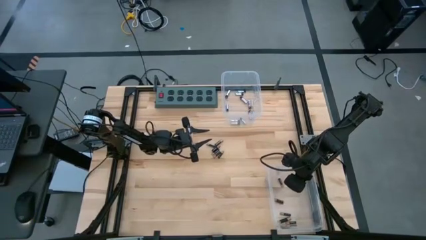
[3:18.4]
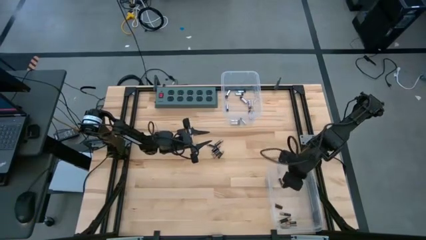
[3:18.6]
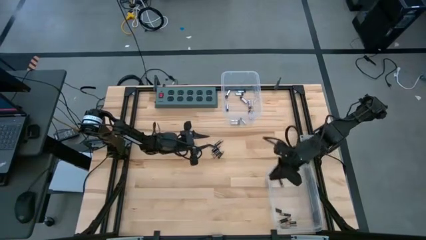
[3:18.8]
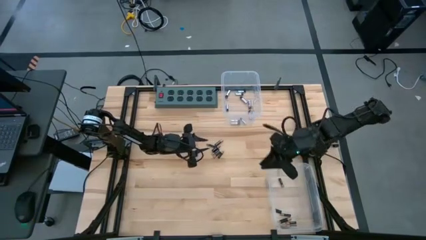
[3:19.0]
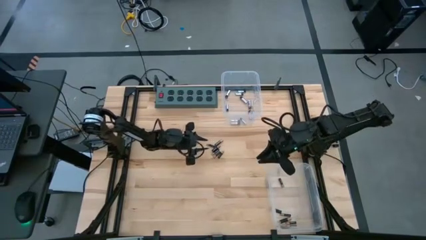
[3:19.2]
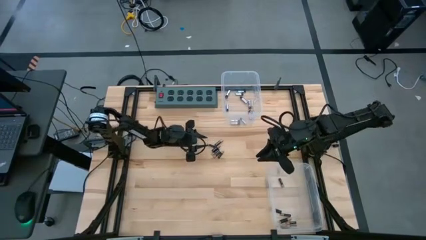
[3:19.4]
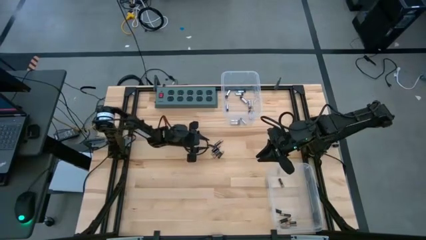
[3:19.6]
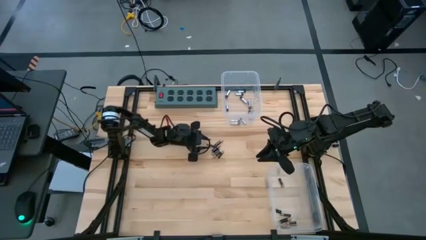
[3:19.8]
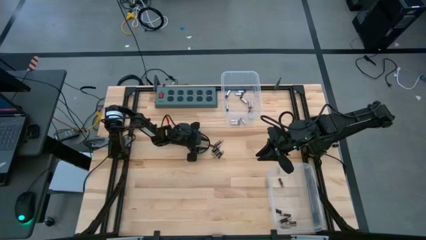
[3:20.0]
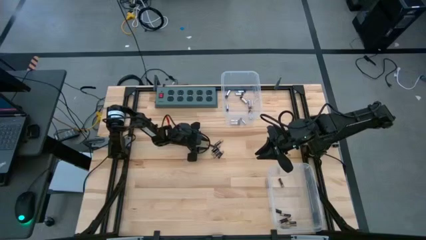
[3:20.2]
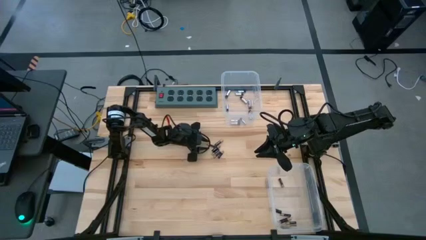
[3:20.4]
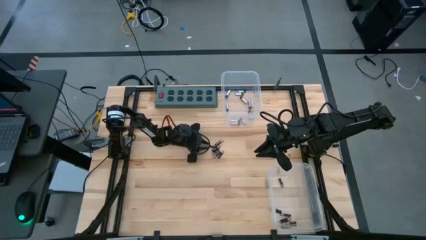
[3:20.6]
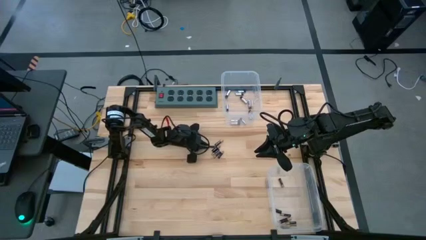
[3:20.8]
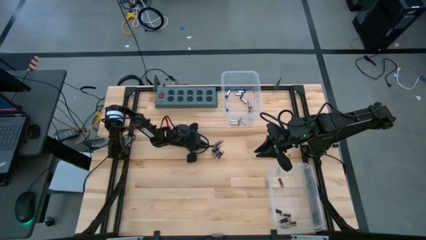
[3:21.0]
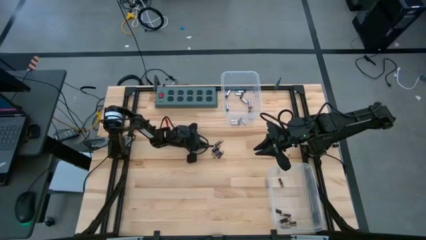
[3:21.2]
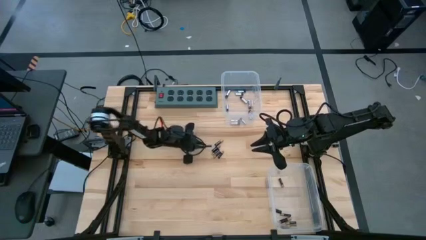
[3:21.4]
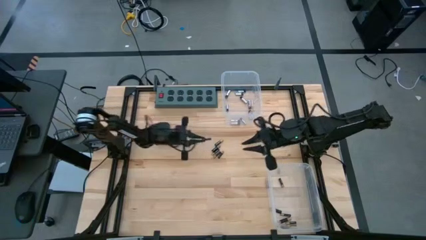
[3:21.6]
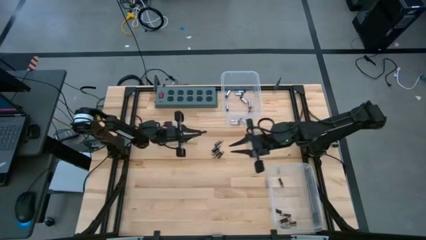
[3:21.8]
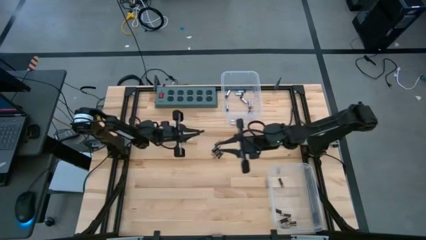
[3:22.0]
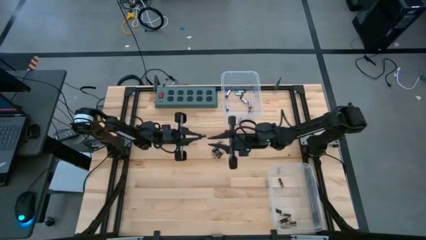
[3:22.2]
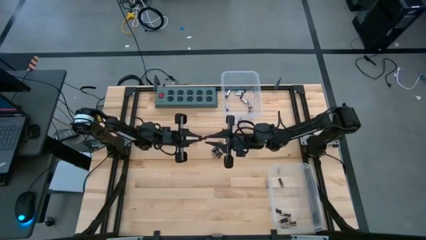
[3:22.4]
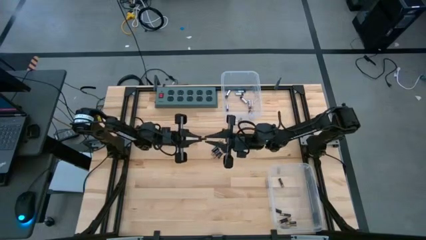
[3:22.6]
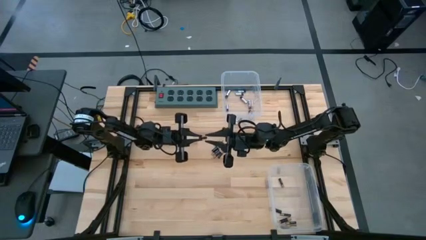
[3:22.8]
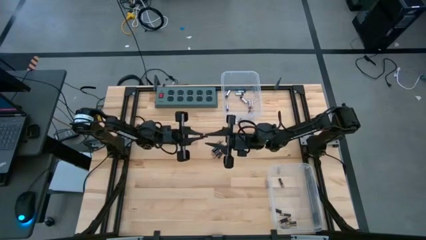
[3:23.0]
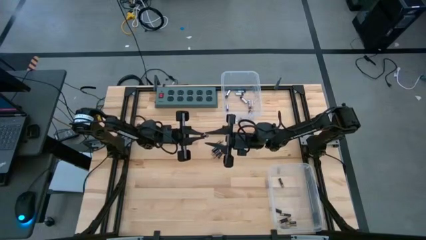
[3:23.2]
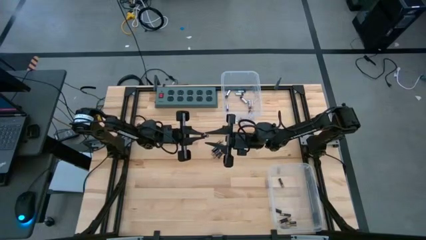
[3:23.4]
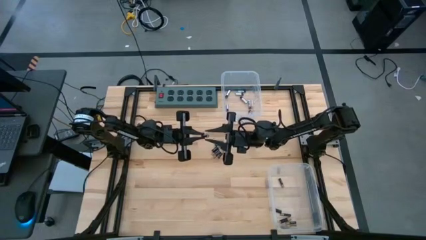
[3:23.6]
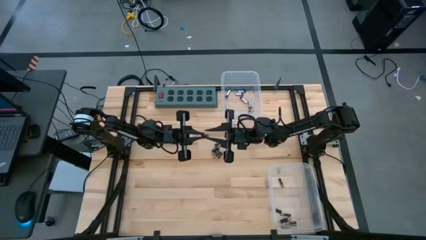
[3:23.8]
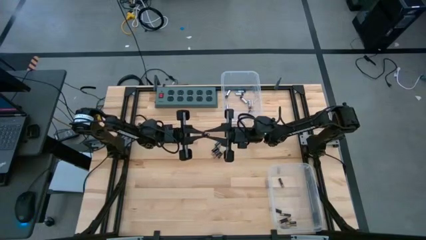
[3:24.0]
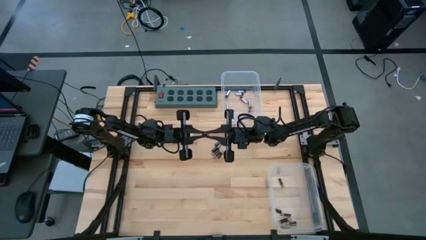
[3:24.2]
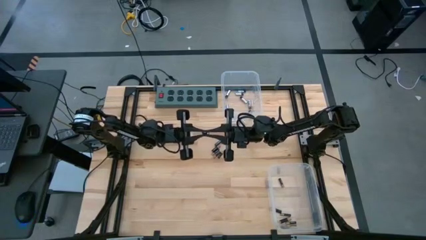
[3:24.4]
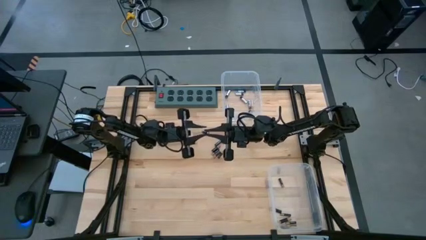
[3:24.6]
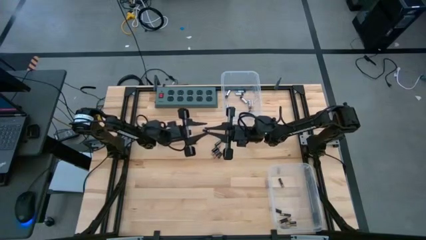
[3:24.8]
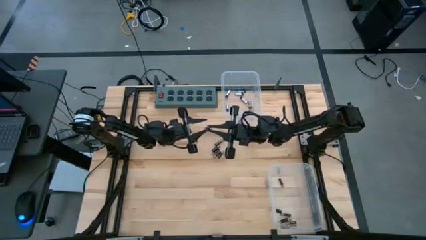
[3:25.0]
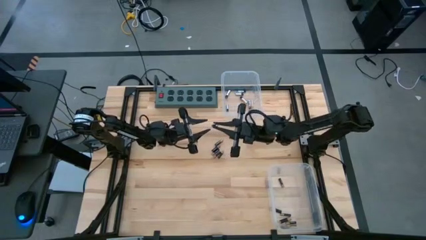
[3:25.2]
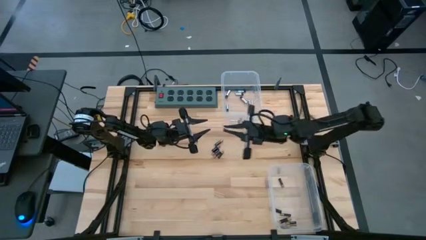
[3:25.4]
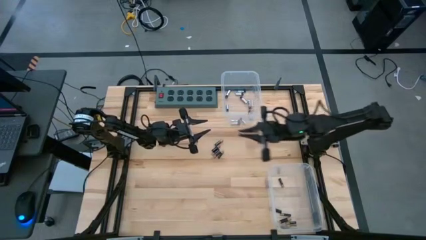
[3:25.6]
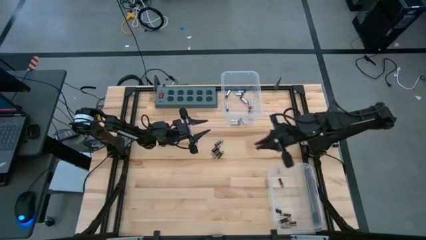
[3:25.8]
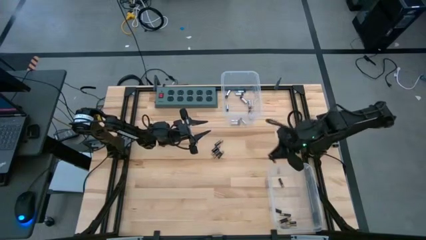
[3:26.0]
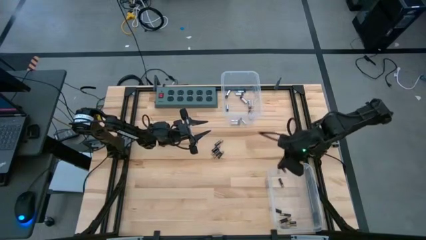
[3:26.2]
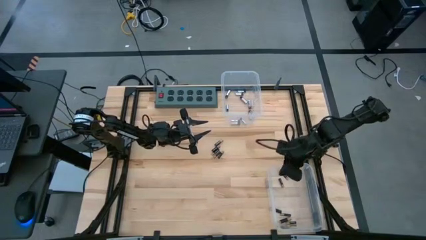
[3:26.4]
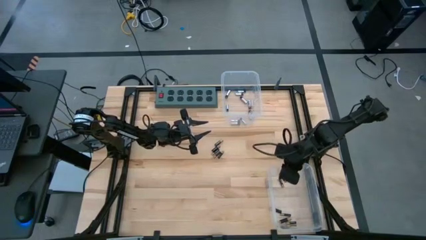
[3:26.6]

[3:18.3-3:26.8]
Task: Sort batteries
Put the black battery into the bottom transparent bin

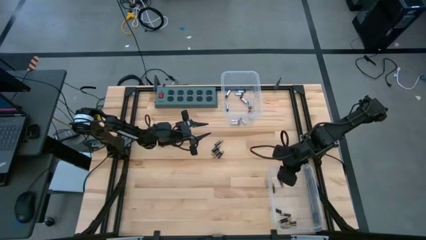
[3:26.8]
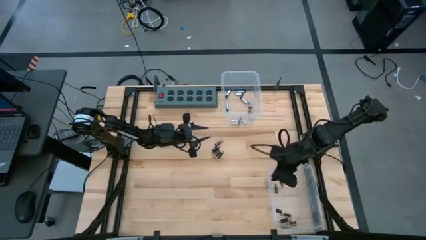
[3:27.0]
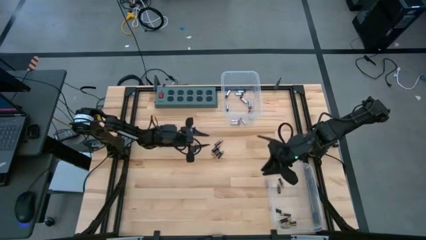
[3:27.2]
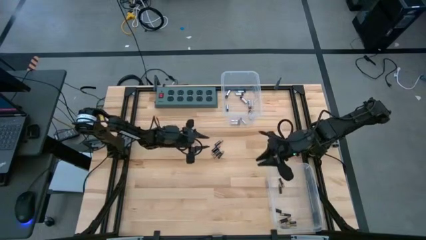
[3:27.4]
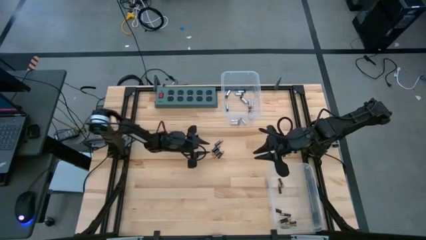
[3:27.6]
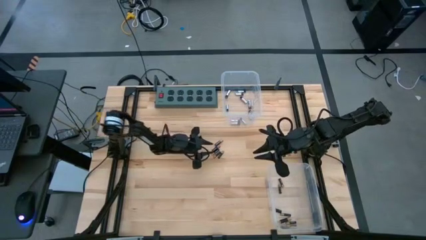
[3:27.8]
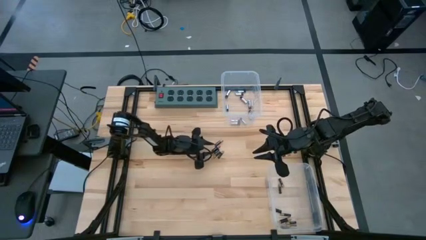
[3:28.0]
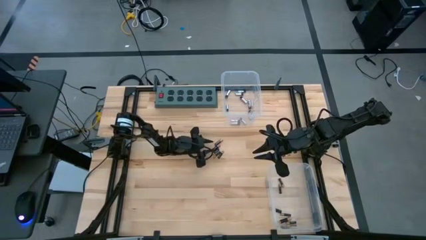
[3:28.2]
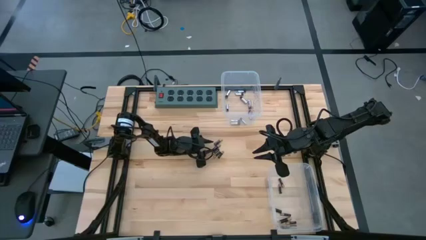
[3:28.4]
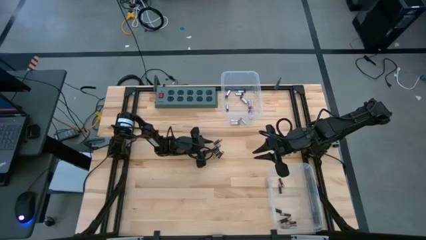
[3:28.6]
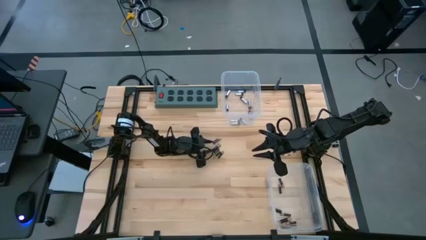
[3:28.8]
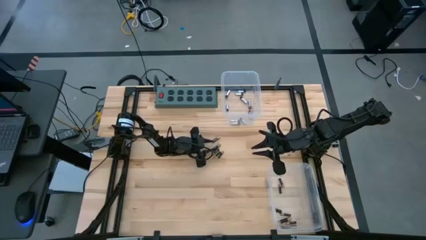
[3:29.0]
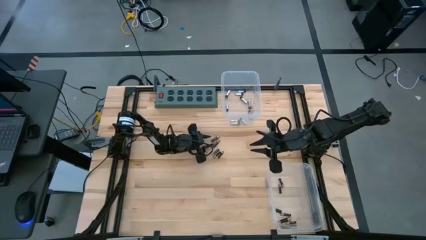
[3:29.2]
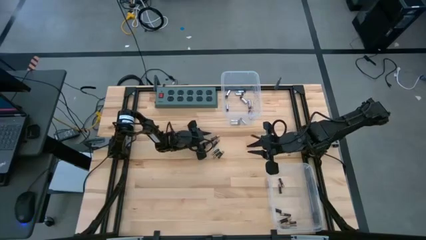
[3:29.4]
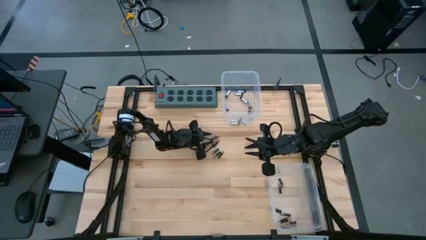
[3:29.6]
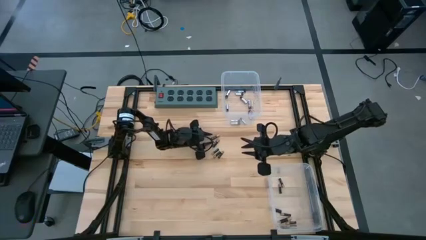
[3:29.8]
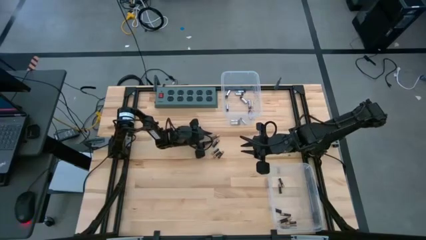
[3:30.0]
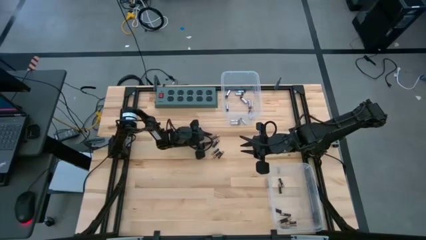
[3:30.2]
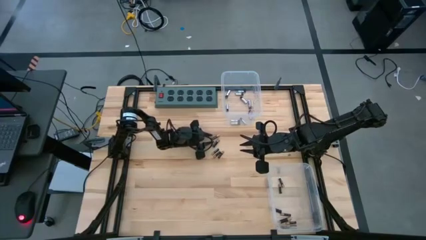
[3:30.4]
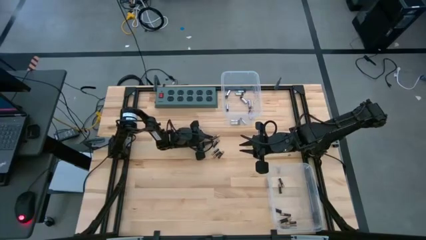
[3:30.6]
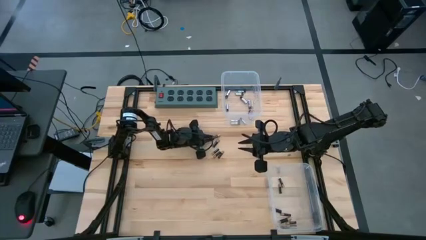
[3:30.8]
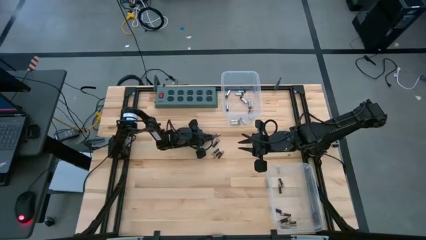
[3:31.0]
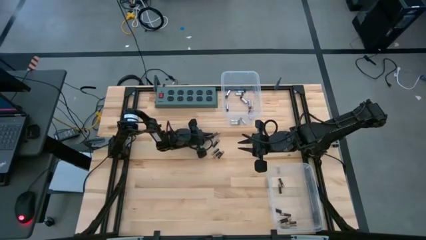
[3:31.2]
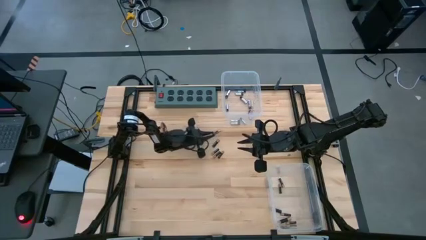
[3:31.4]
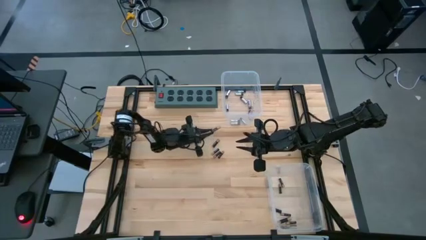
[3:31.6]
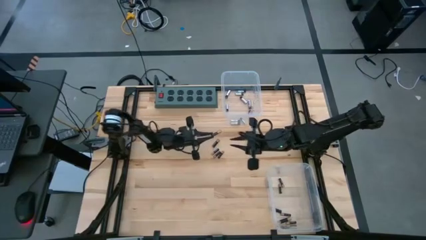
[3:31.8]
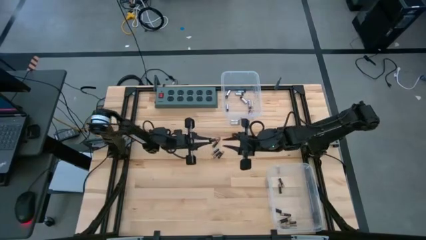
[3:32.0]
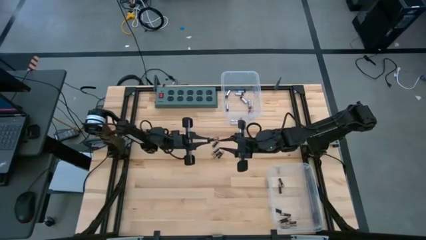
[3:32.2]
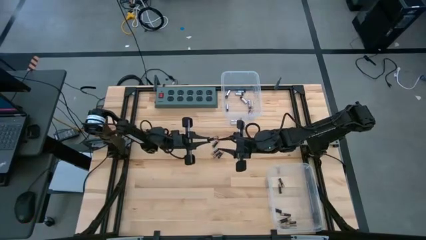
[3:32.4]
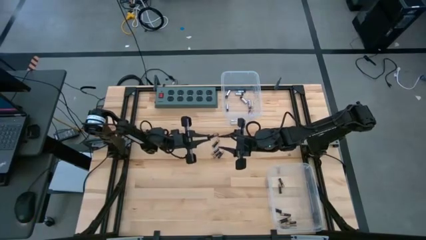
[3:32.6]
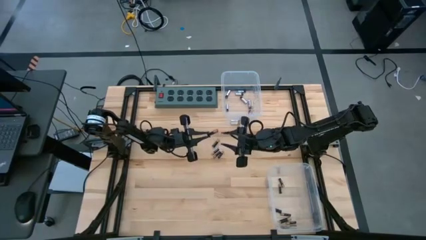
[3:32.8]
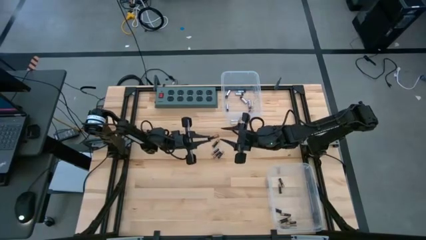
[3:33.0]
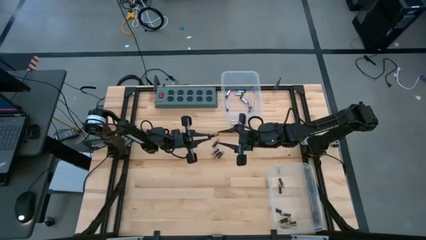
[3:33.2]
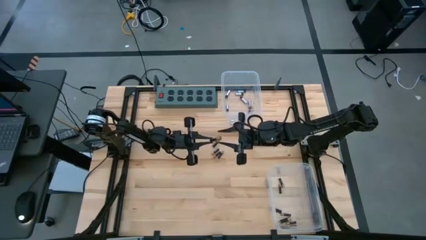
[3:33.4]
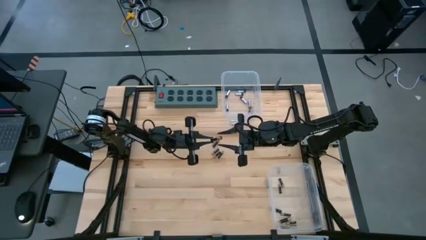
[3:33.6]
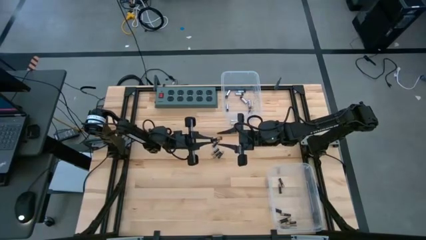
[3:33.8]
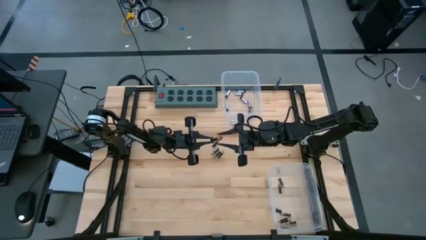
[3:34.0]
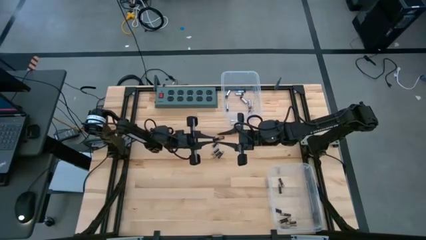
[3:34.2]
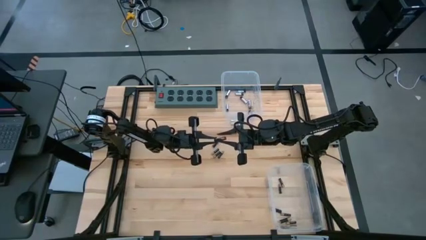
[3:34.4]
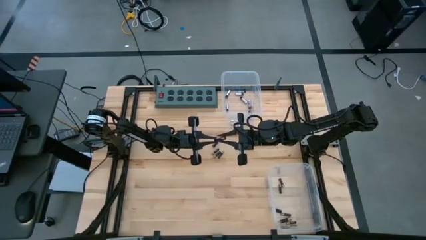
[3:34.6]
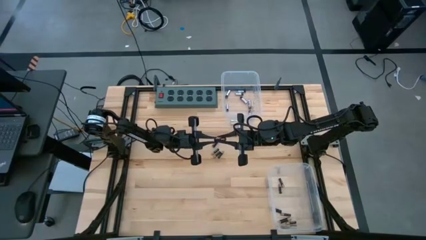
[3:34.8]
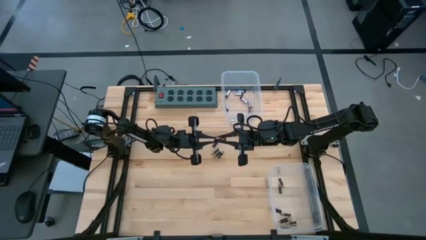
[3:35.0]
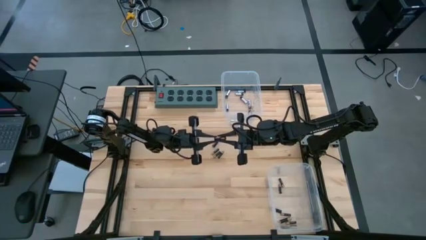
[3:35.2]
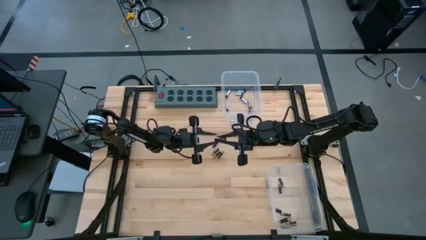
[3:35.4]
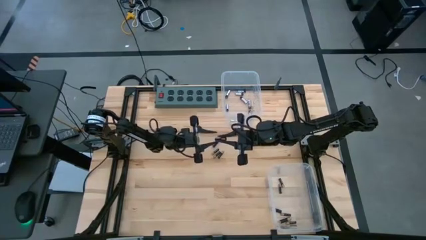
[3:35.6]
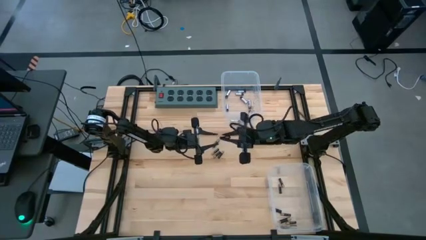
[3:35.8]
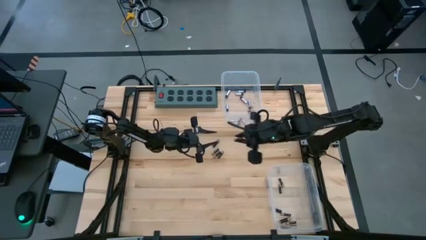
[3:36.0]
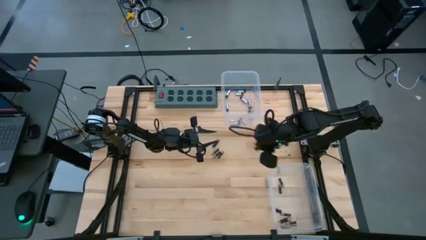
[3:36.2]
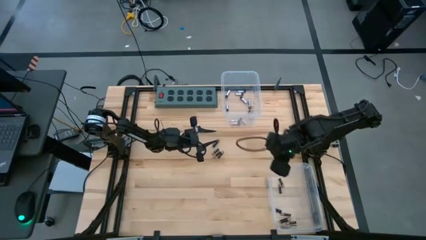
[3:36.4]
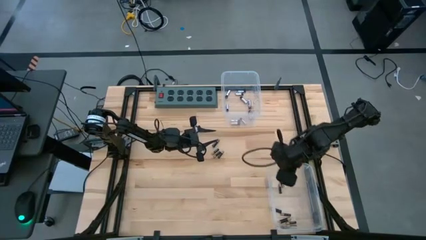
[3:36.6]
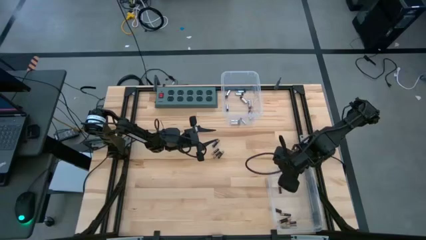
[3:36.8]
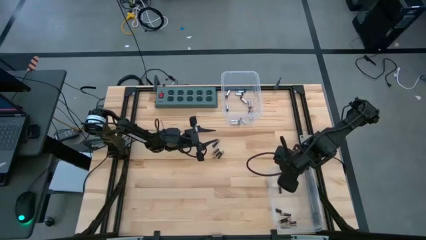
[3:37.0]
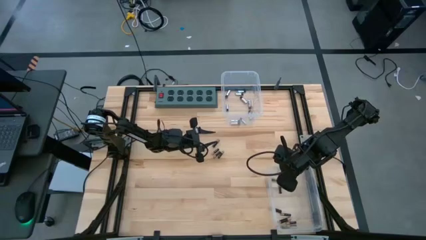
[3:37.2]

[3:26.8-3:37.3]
Put the black battery into the bottom transparent bin
